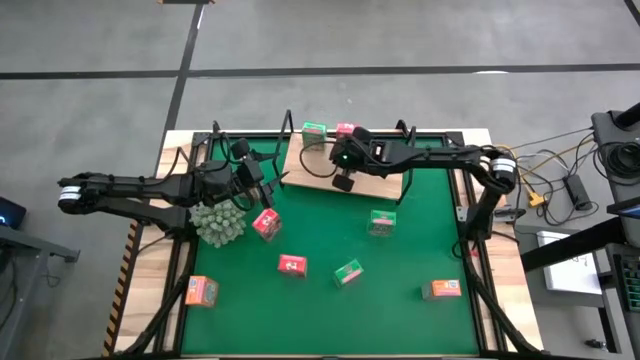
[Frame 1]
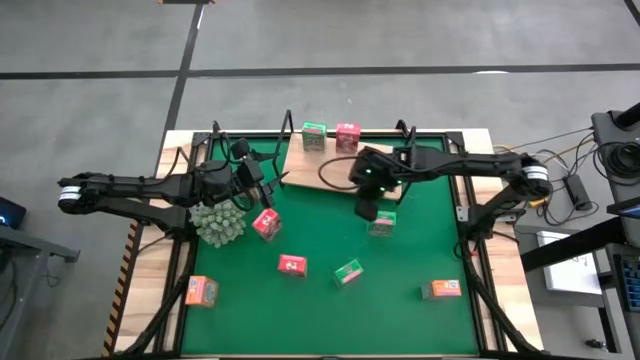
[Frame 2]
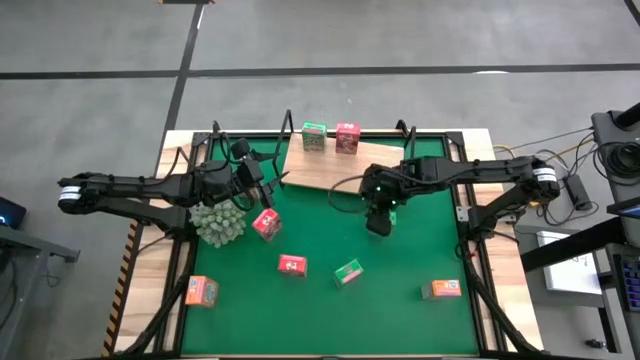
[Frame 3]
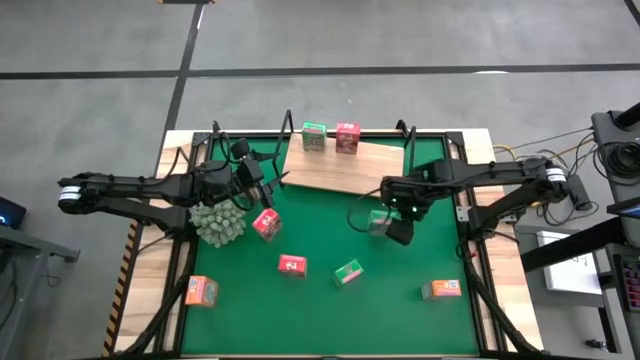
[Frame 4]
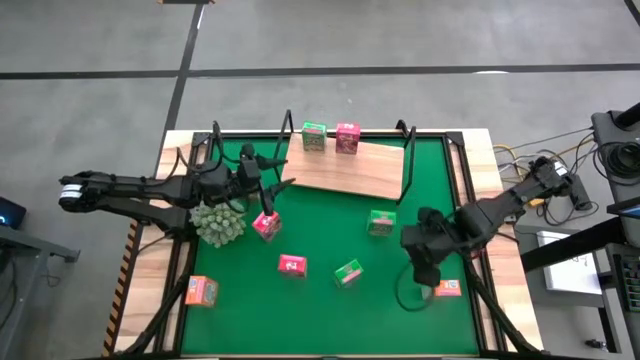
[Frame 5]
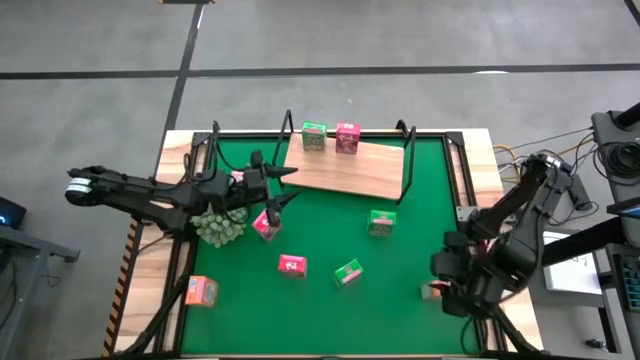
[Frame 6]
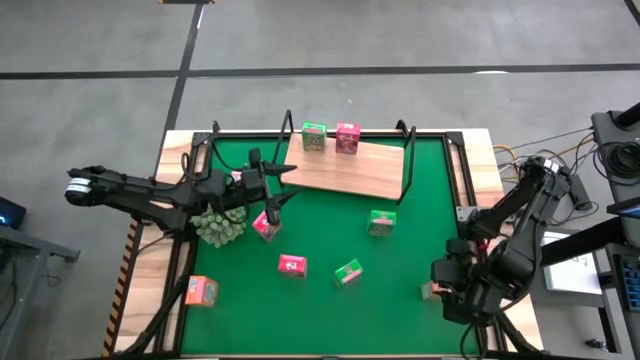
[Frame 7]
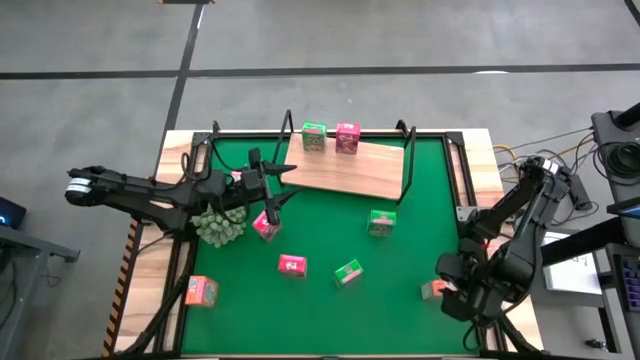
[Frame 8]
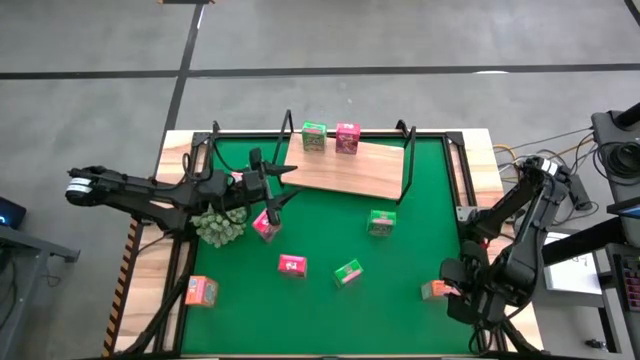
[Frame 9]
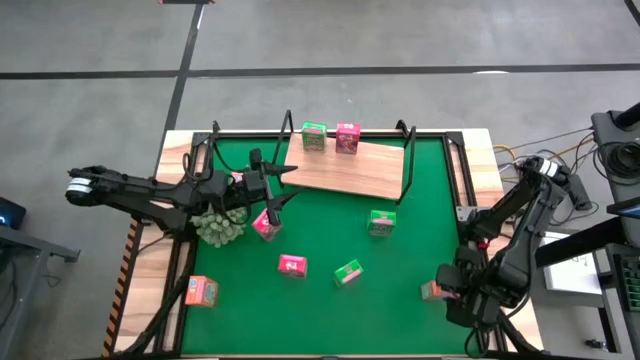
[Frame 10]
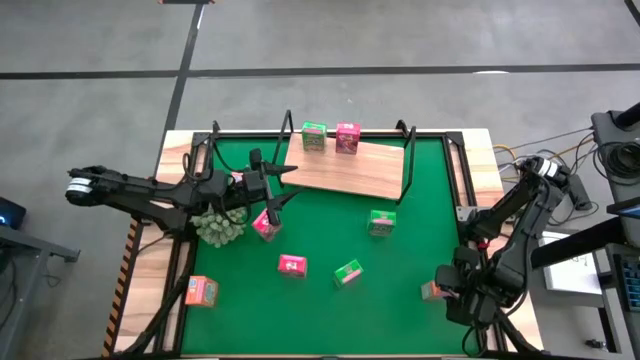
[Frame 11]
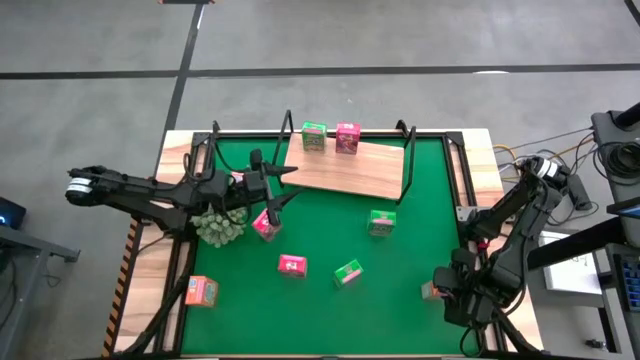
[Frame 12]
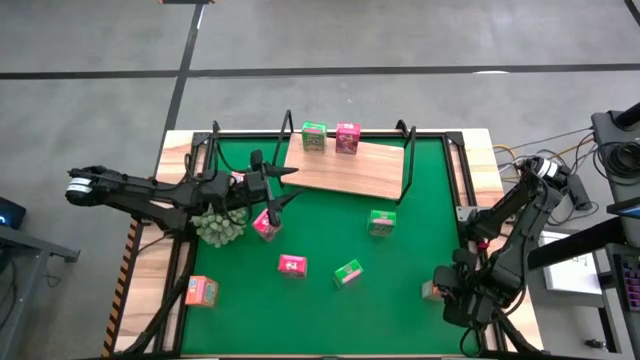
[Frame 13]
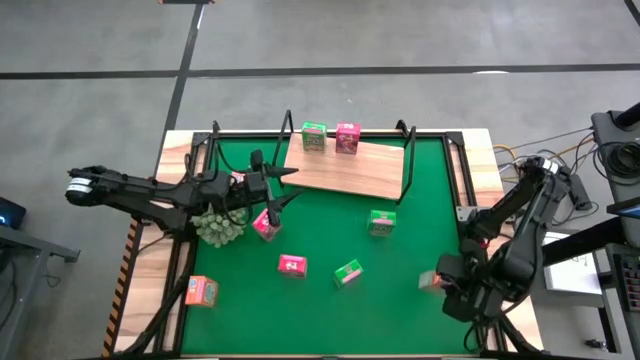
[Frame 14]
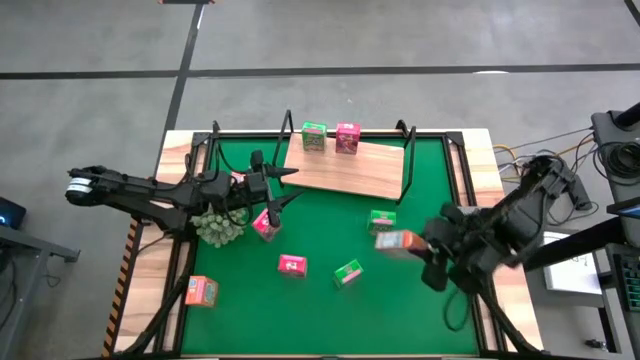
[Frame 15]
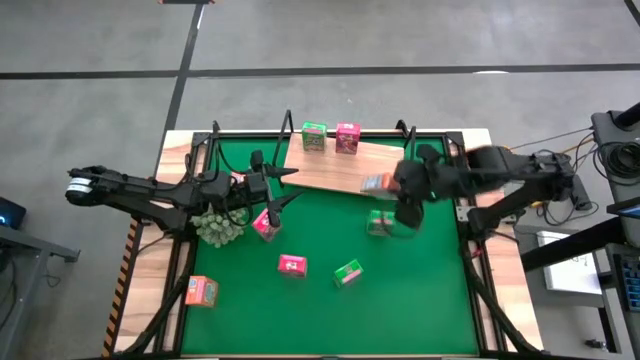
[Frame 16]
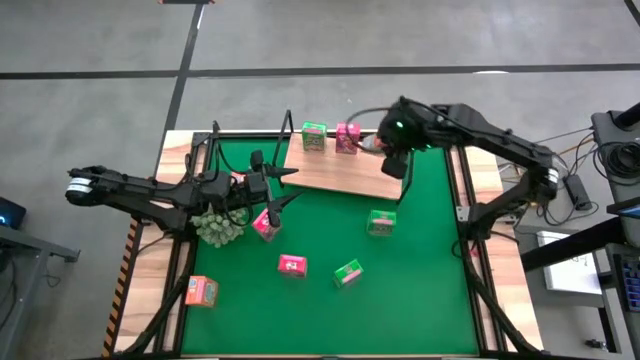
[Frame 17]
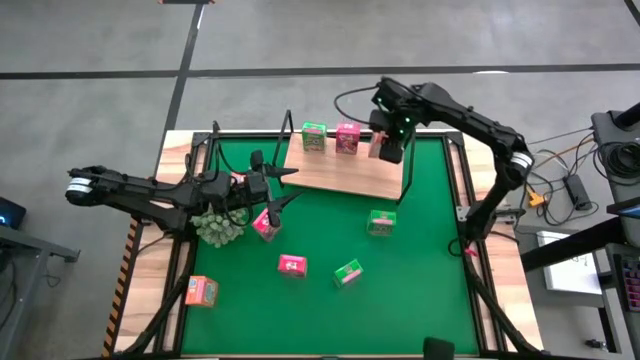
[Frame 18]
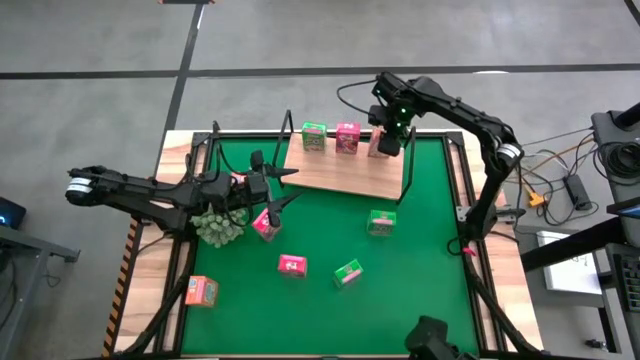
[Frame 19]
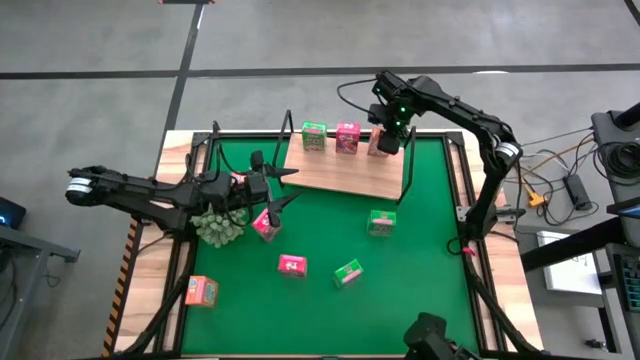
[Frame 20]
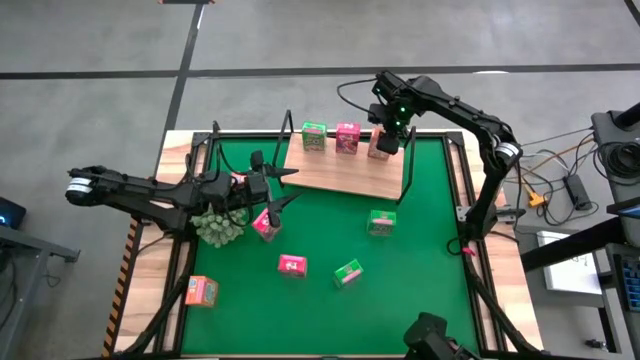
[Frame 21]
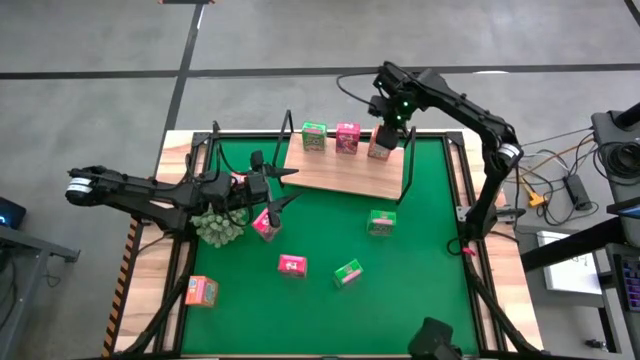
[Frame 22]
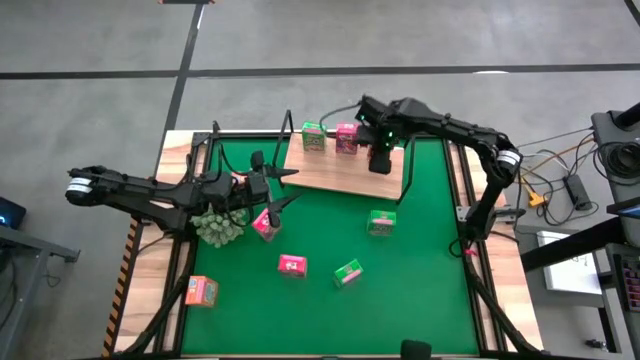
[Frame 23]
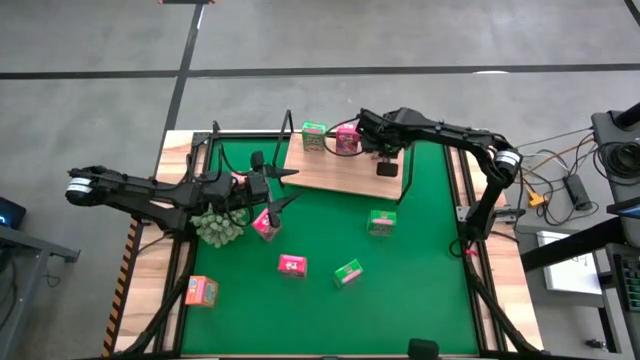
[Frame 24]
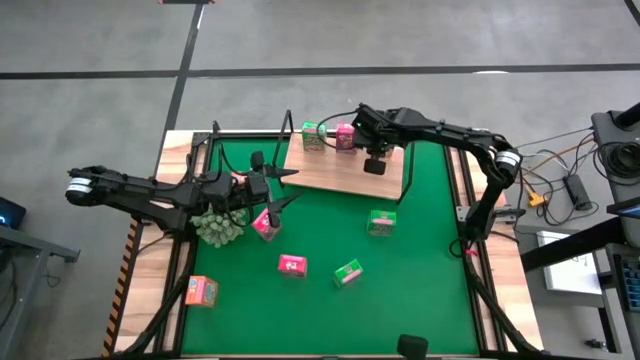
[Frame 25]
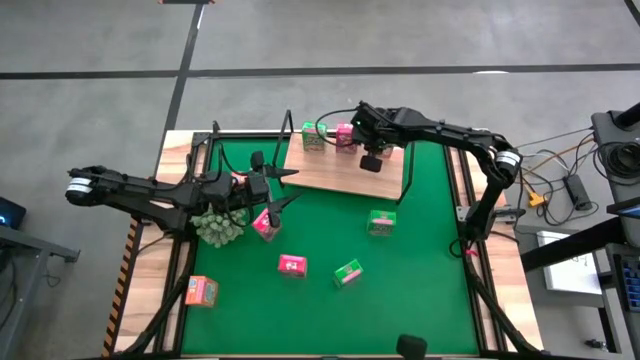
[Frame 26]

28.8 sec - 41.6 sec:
Task: Stack cereal on shelf
Put the right orange cereal box on the shelf

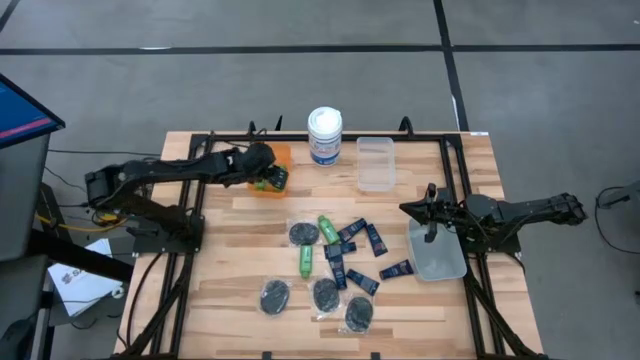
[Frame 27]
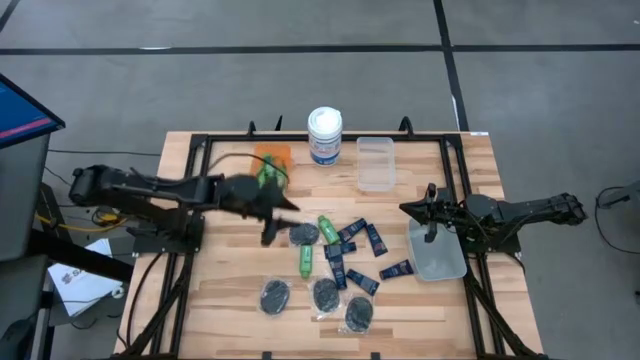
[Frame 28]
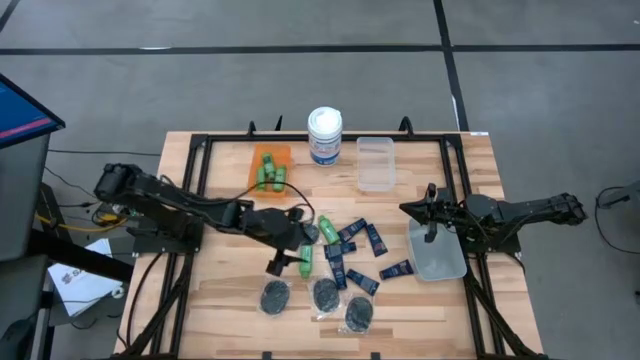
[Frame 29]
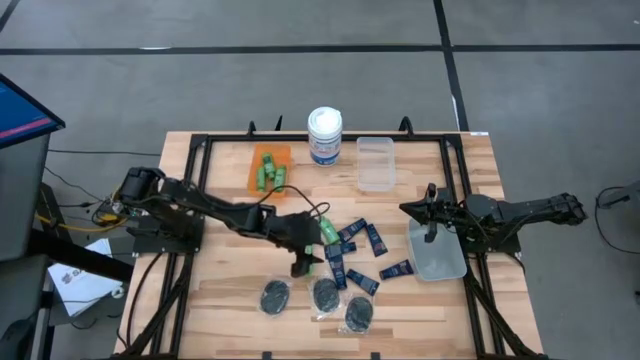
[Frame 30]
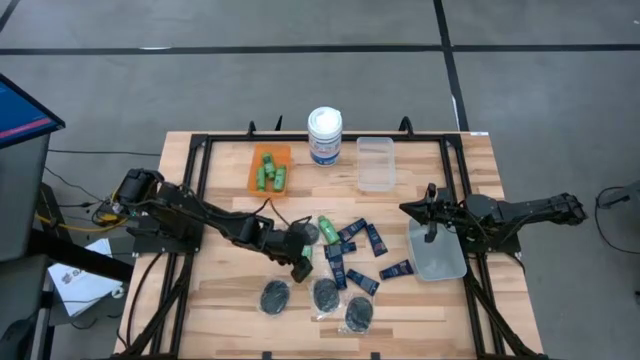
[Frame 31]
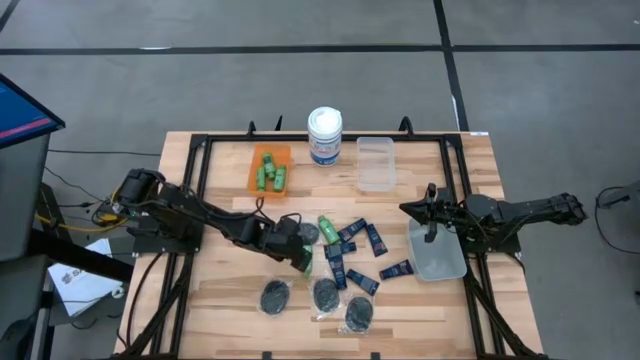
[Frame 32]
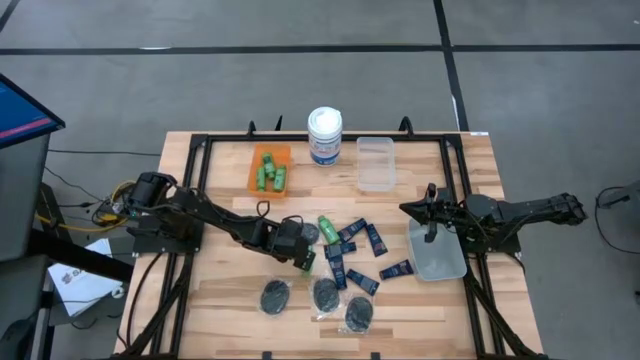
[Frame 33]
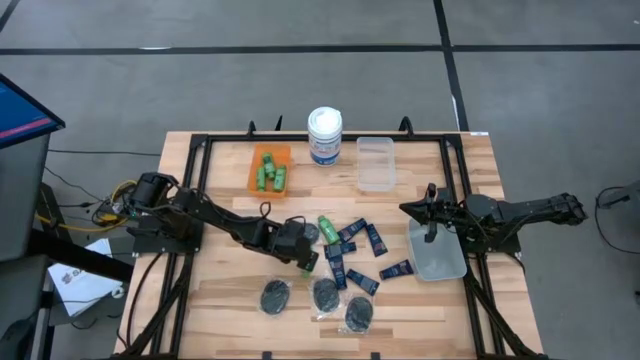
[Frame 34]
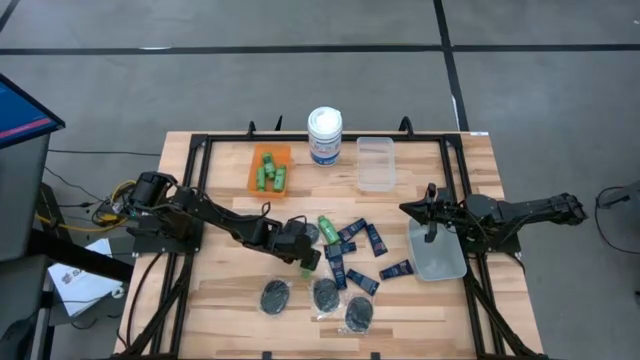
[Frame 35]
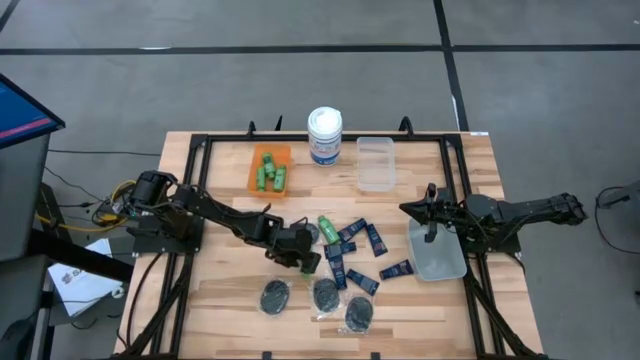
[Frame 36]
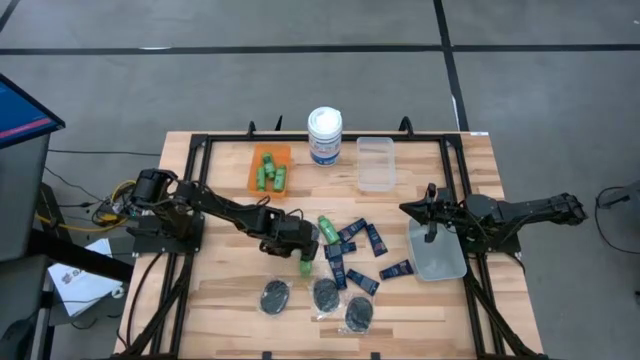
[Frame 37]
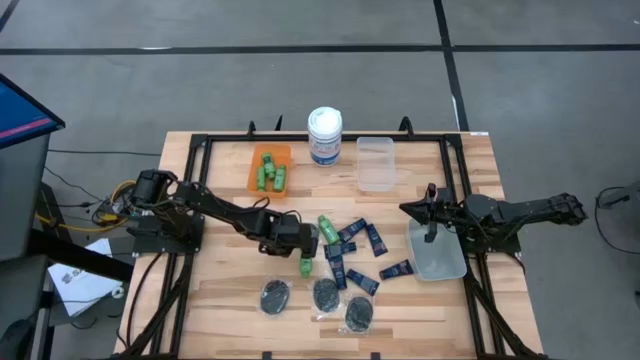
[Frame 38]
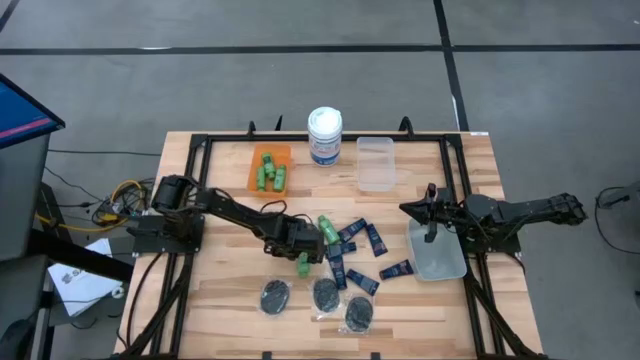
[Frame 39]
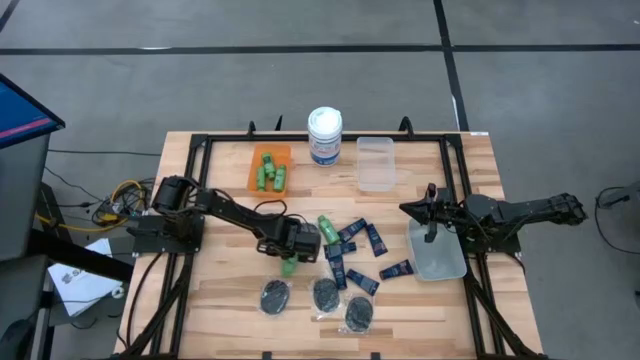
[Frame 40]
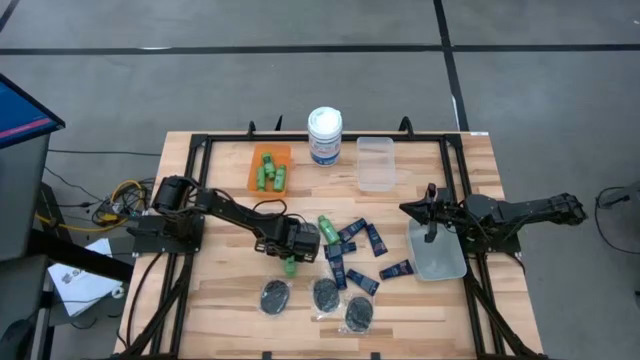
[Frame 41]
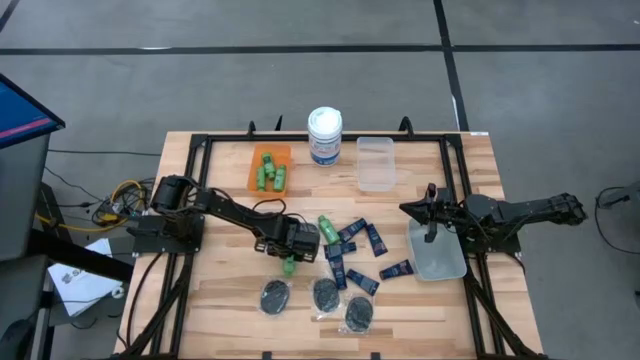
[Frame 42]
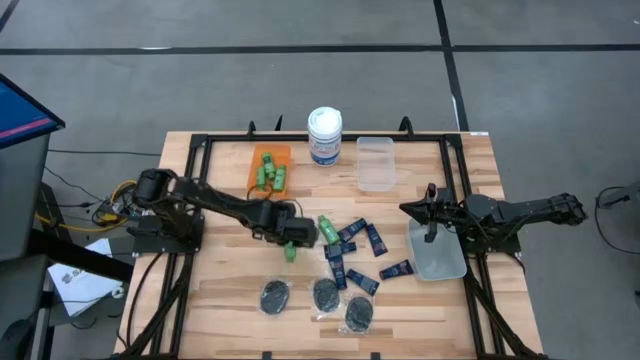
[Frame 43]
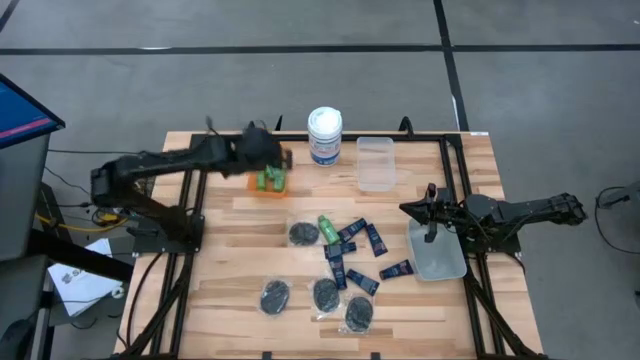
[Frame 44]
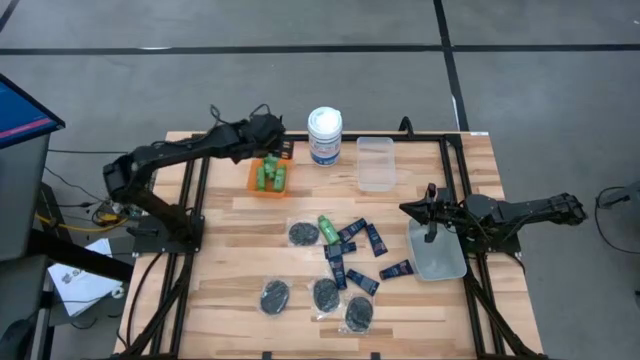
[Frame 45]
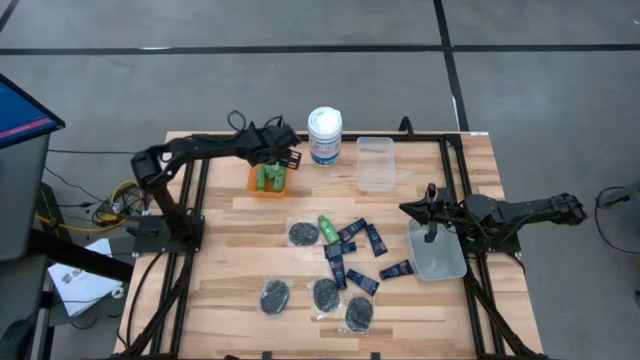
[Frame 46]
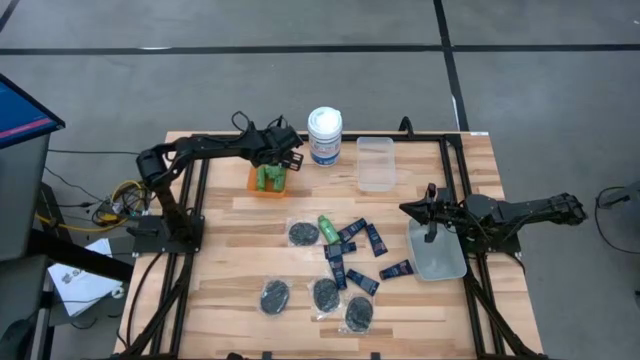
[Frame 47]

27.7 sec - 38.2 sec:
Task: Pick & Place Travel size toiletries
Put the green shampoo into the orange bin
